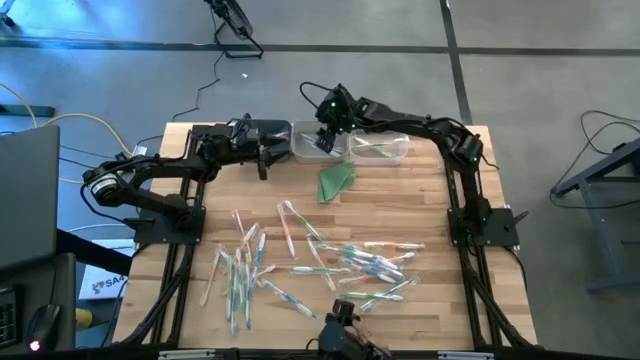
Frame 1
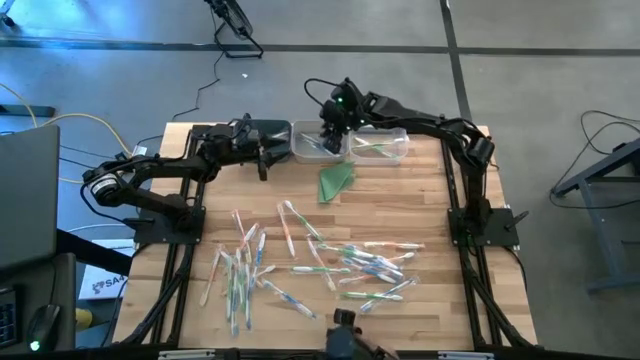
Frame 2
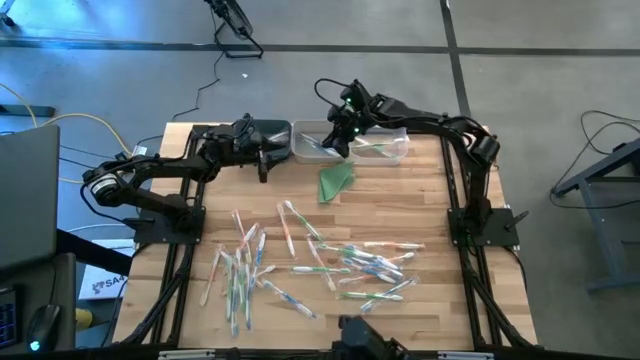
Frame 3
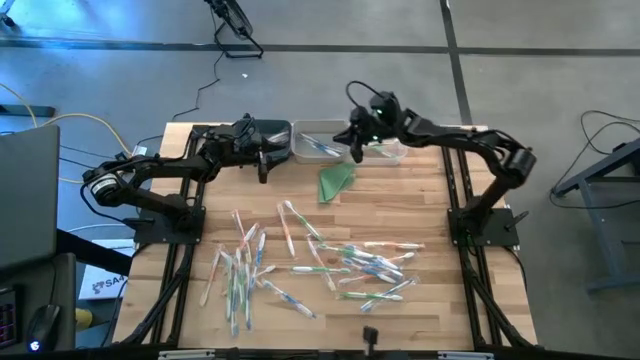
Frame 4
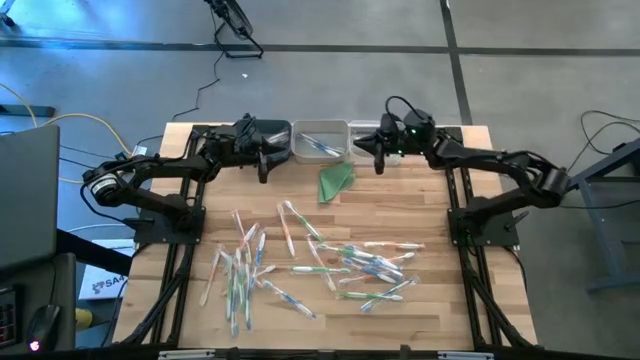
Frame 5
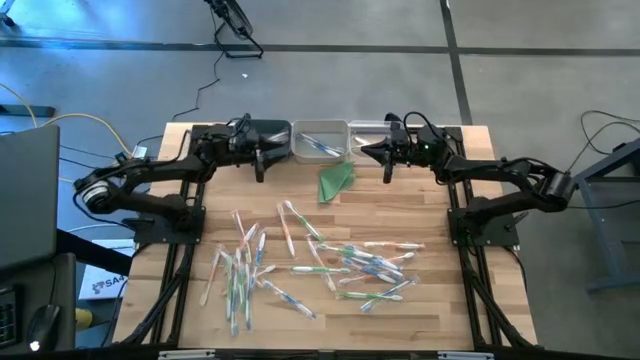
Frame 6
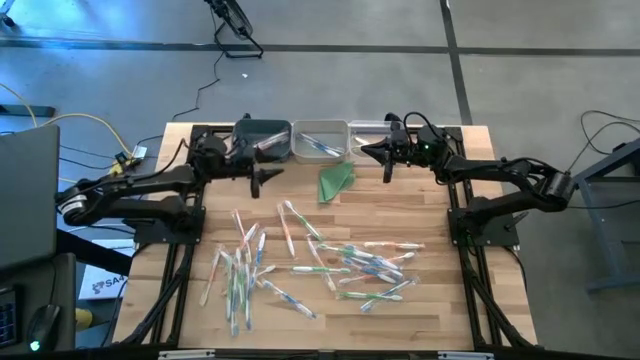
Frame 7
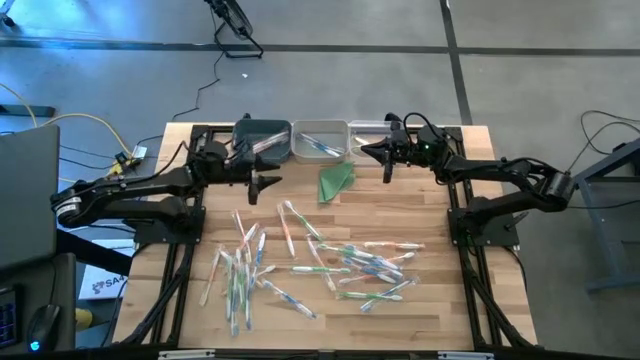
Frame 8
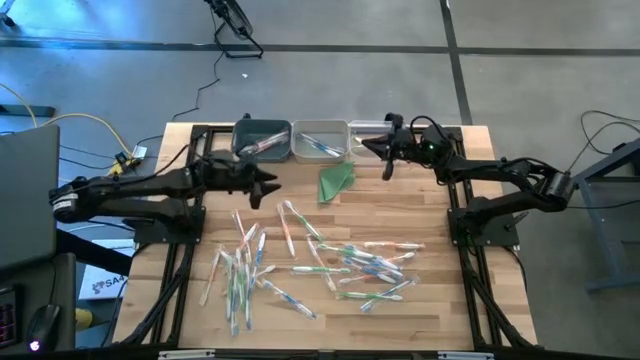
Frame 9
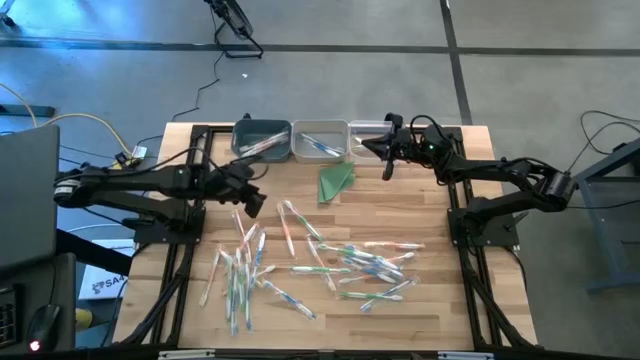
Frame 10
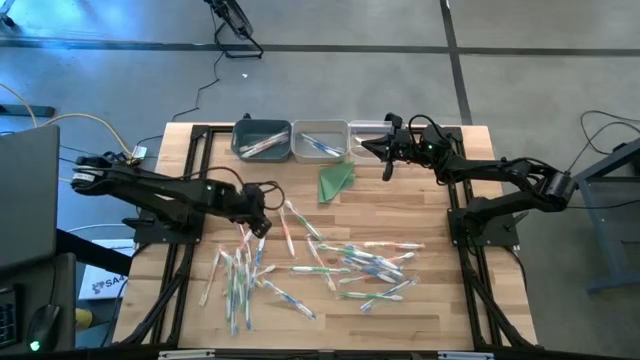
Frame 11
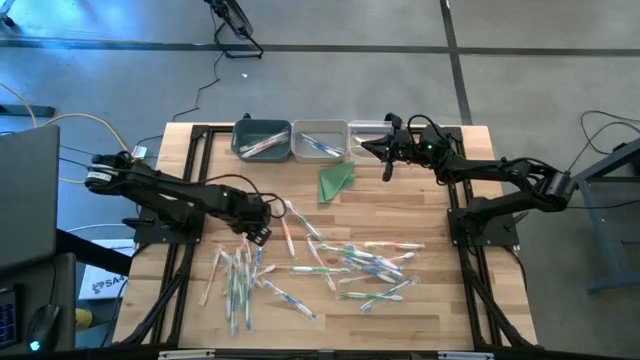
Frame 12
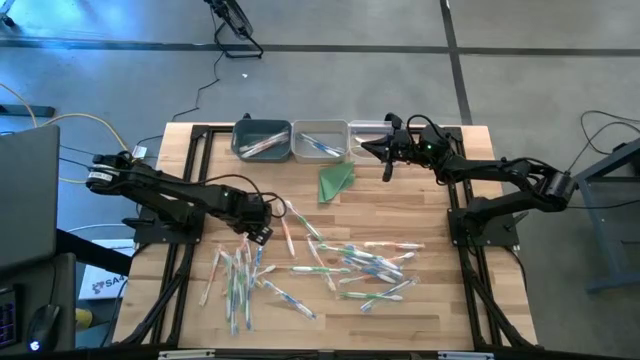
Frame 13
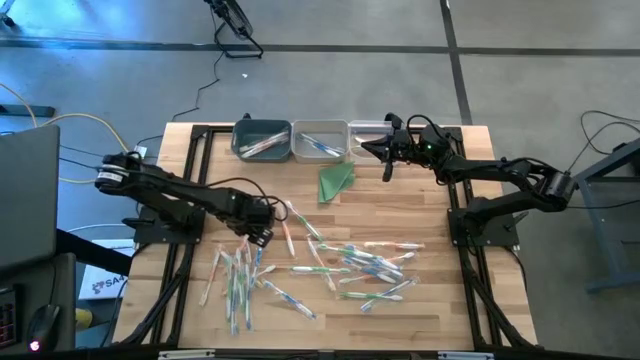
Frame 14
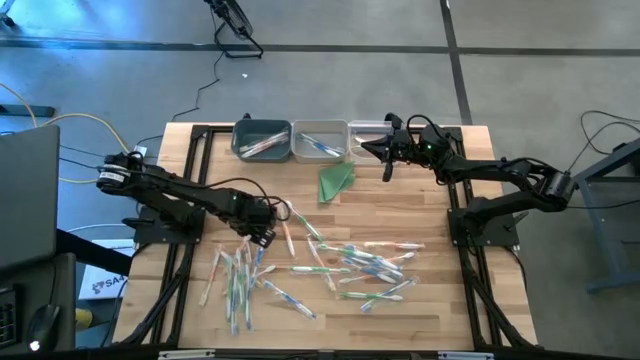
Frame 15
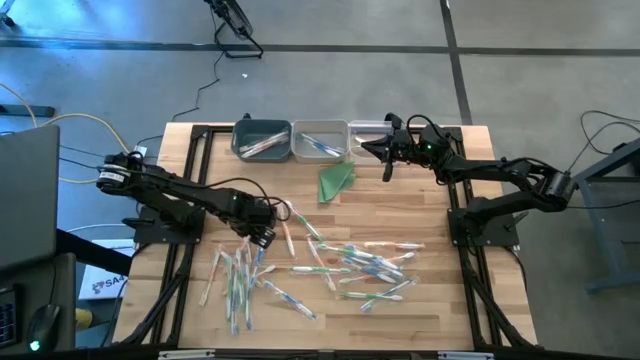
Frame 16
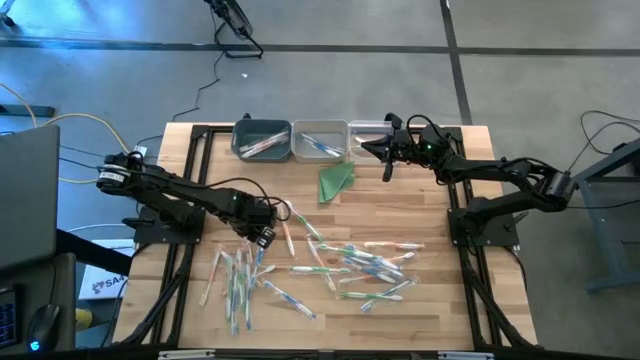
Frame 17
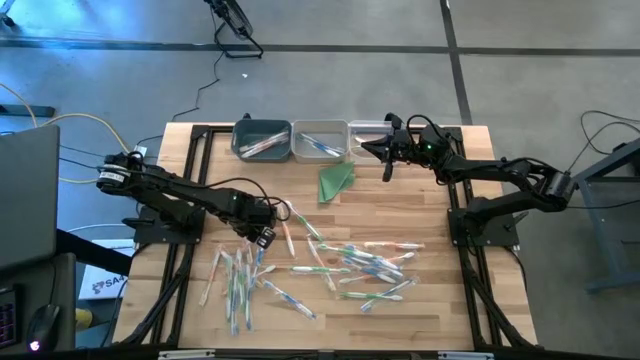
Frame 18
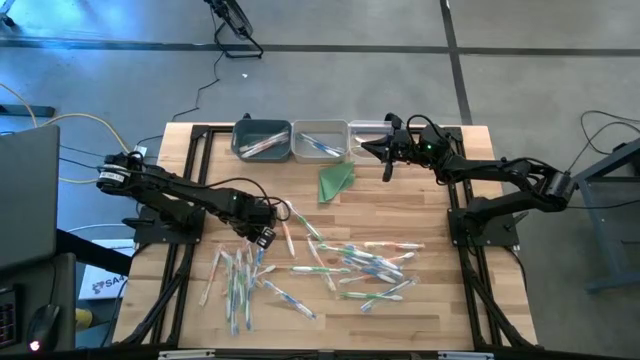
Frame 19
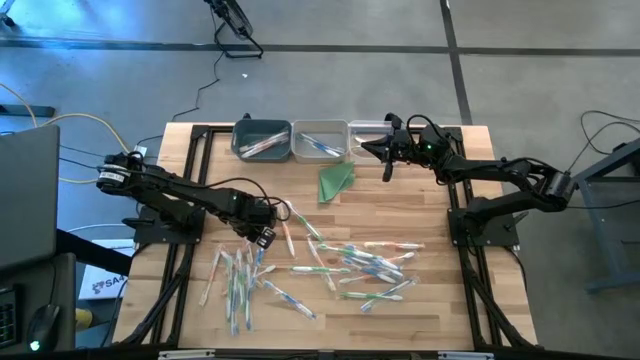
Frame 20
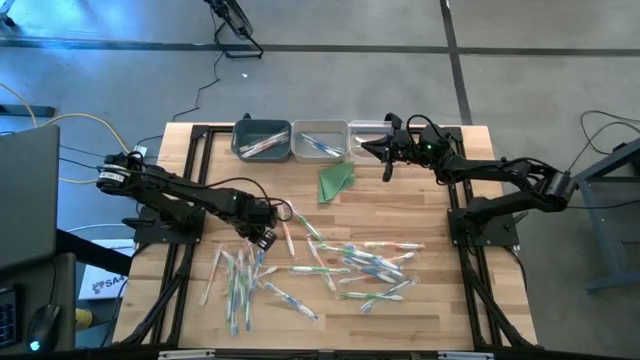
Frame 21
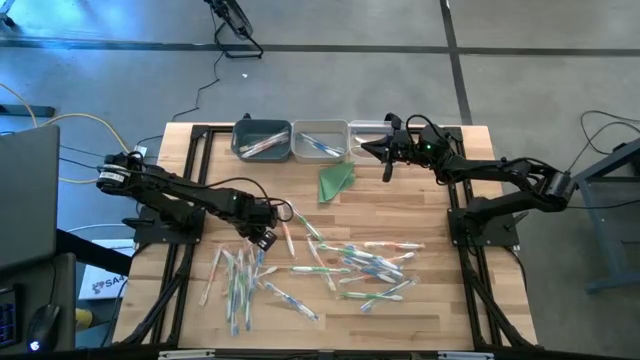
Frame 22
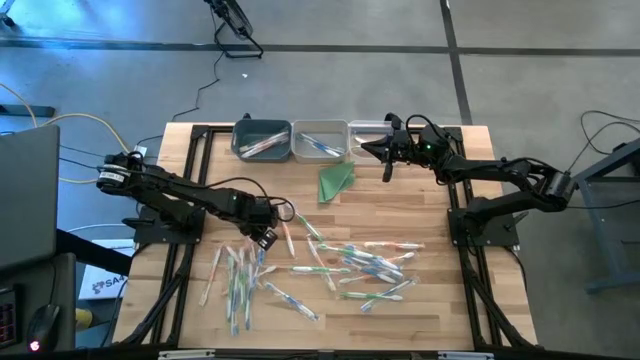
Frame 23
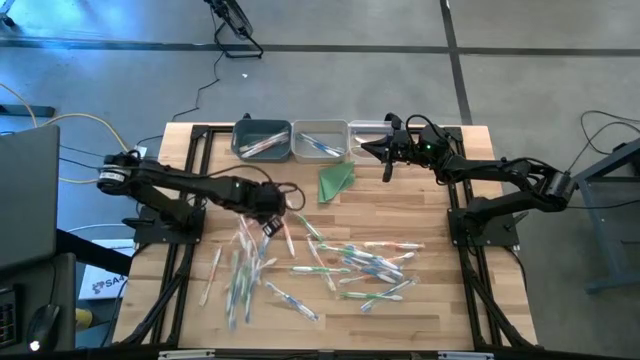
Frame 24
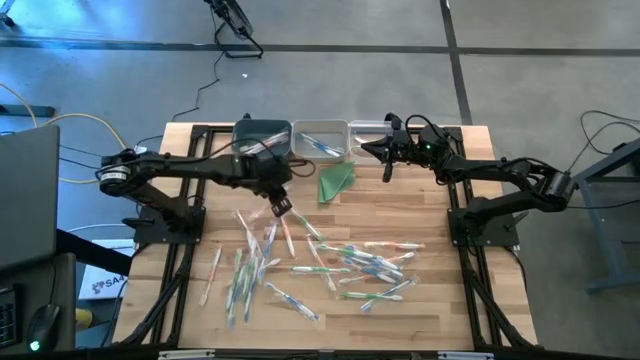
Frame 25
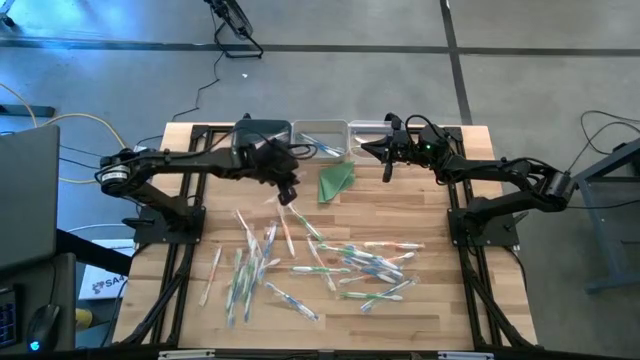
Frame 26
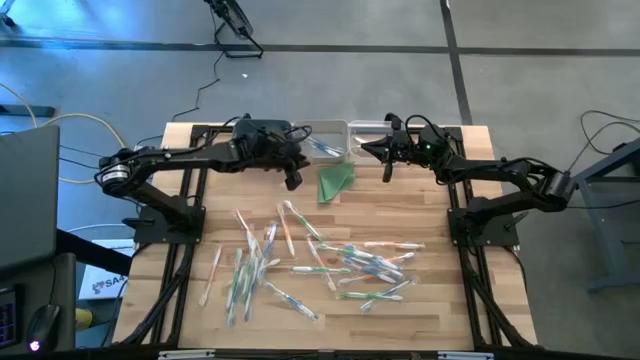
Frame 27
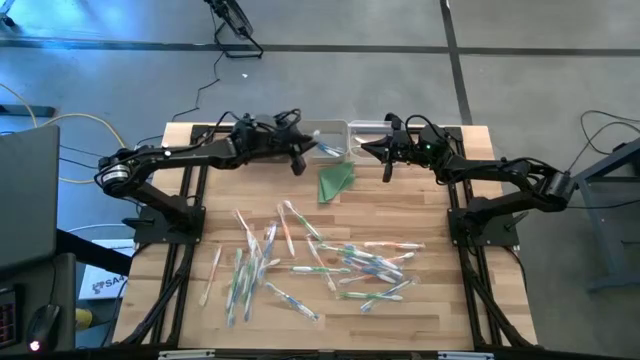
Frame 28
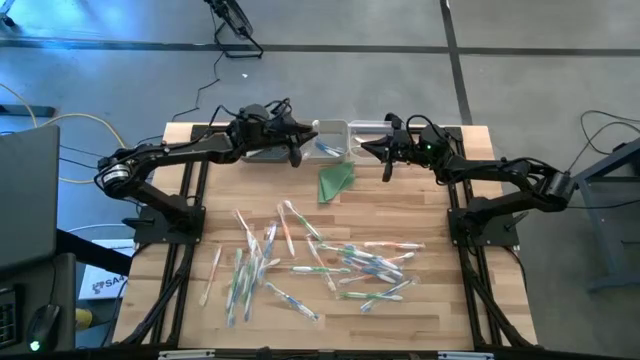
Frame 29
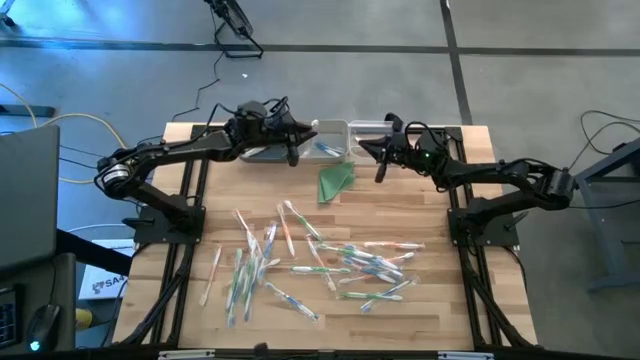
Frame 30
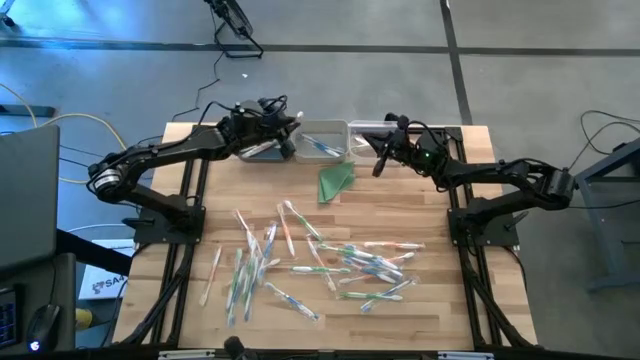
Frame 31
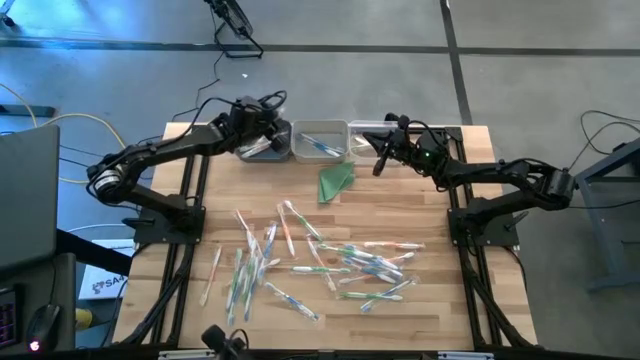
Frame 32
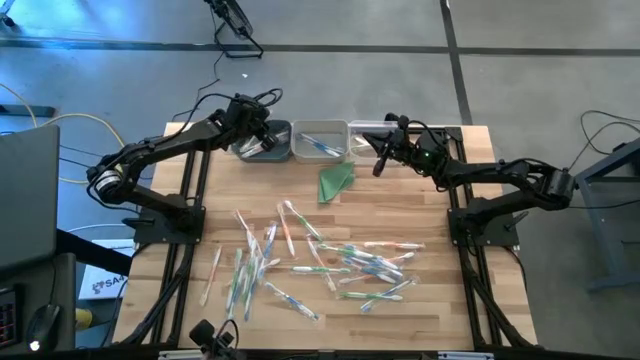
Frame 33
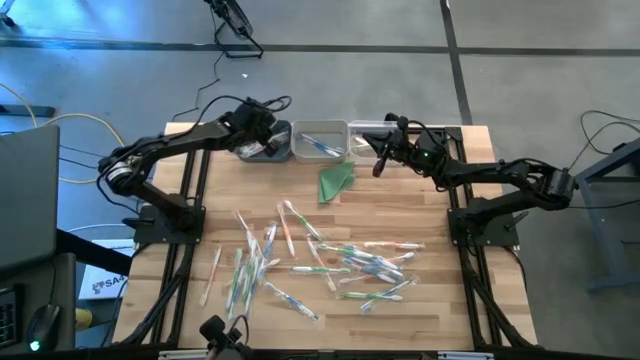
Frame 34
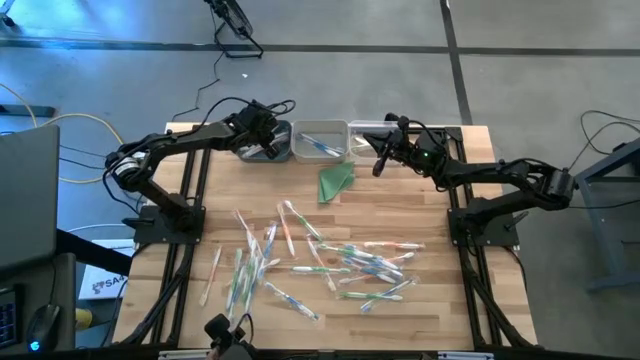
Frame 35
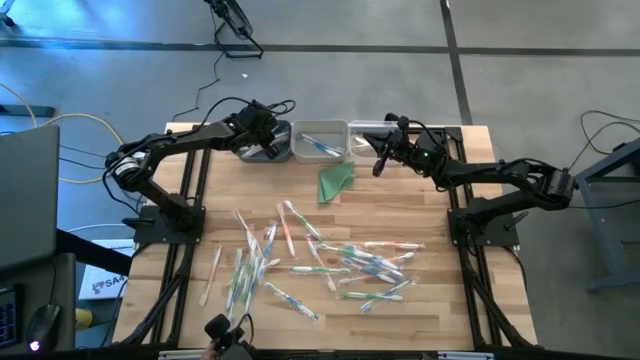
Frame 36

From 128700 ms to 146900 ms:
Task: Pick & Place Toothbrushes
Put the orange toothbrush into the dark blue bin

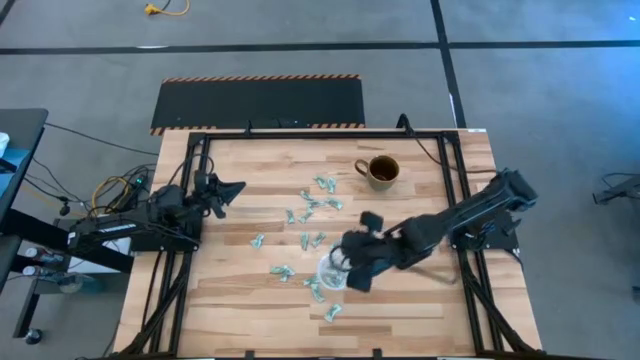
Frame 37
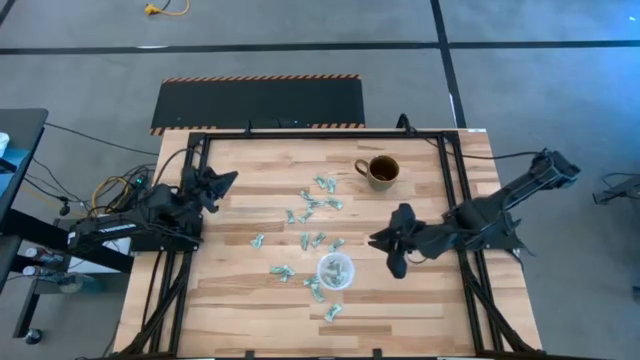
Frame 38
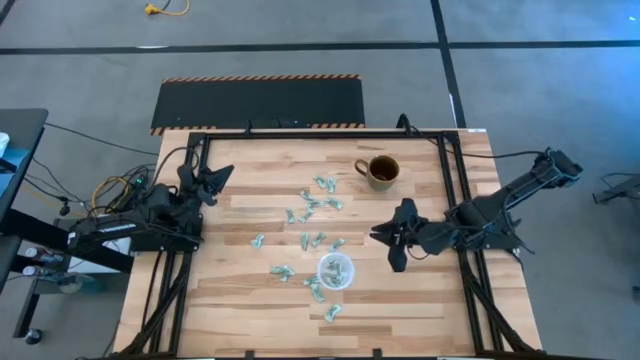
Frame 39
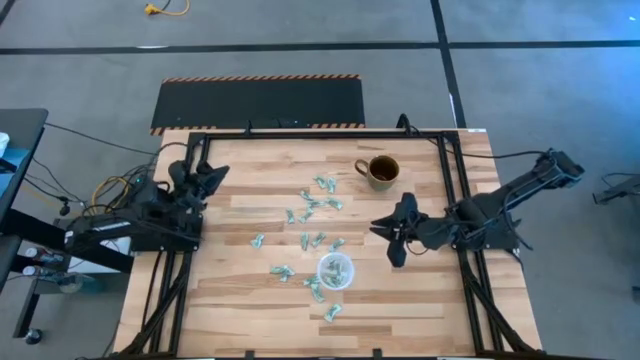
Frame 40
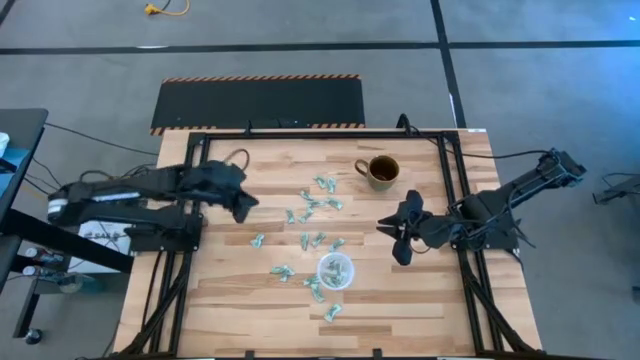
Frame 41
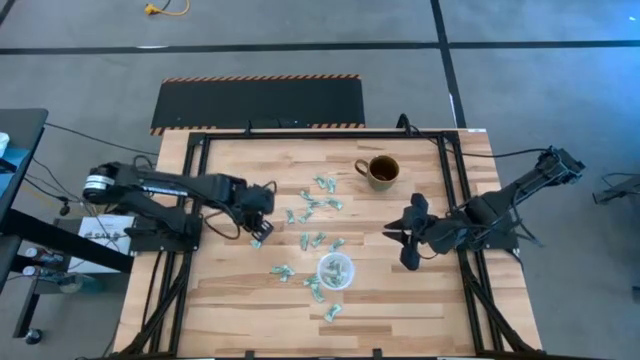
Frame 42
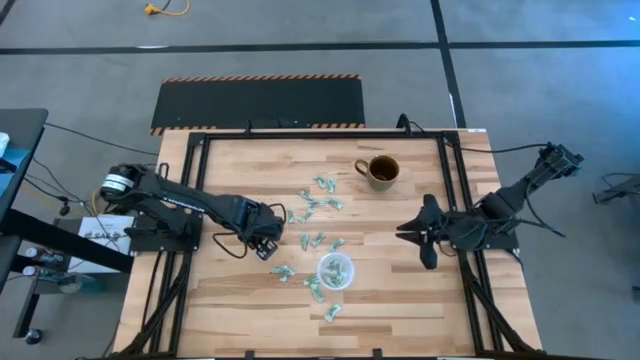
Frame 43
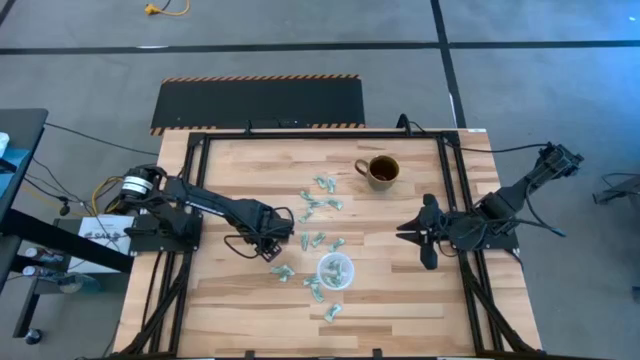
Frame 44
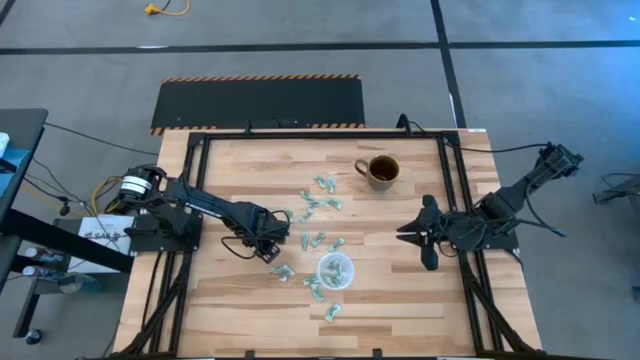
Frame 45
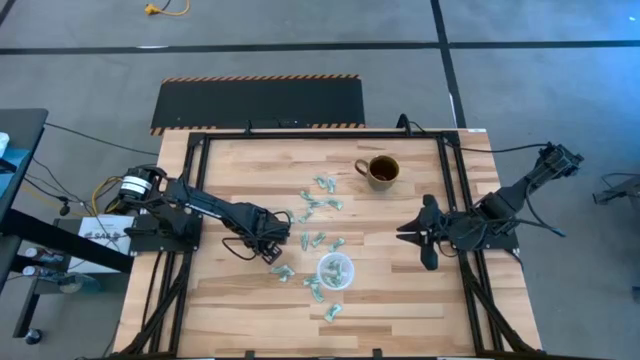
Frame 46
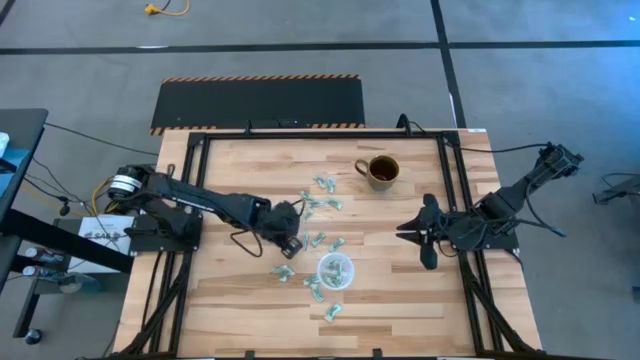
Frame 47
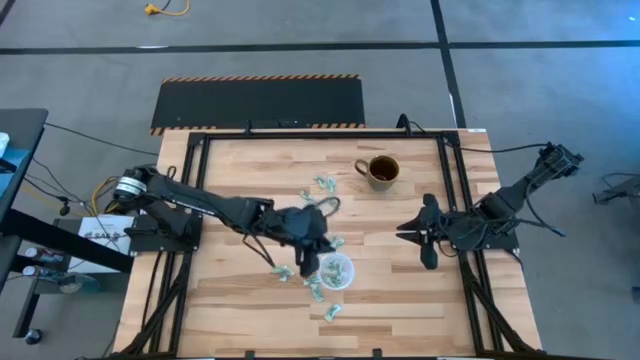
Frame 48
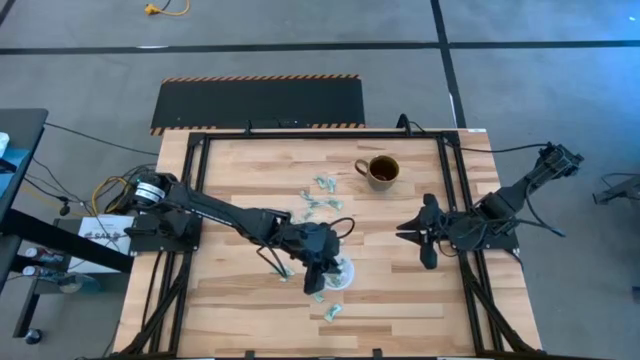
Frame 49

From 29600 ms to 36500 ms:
Task: Pick and place Stevia / Truvia into bins
Put the green stevia packet into the transparent container
